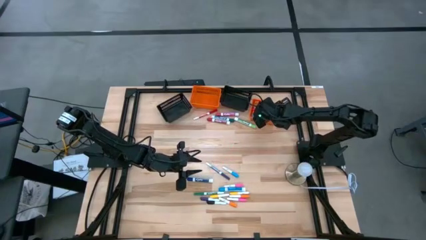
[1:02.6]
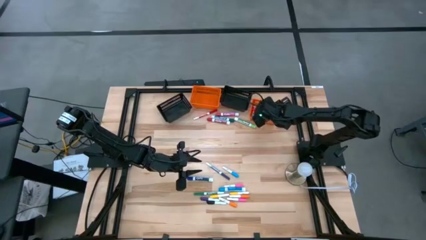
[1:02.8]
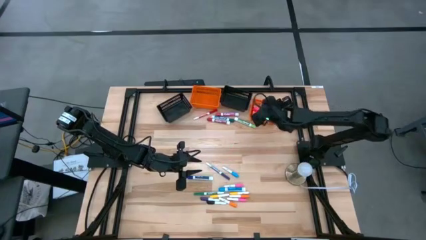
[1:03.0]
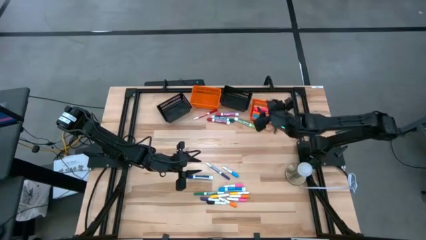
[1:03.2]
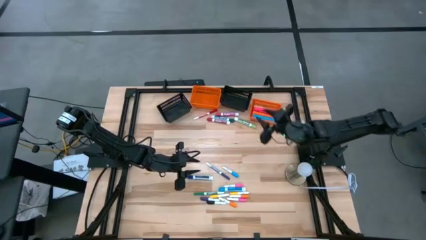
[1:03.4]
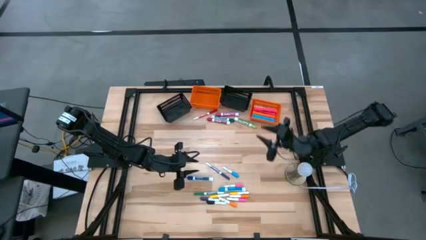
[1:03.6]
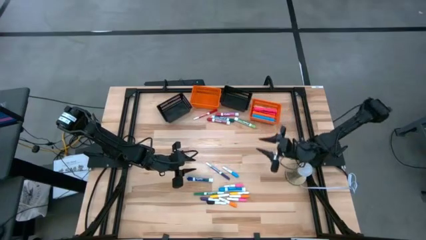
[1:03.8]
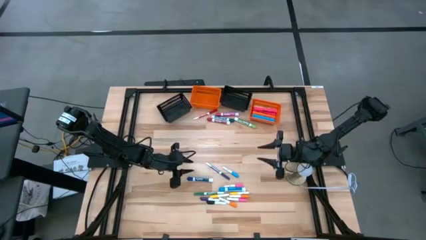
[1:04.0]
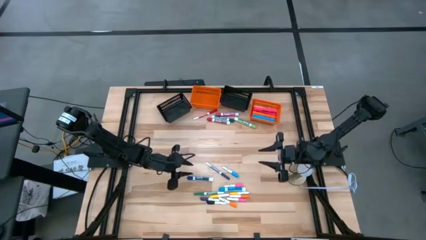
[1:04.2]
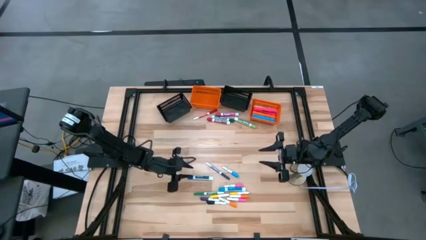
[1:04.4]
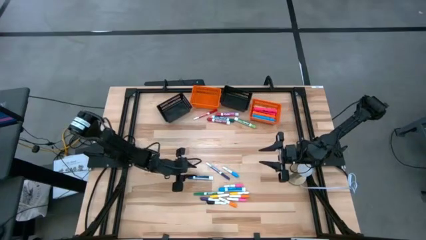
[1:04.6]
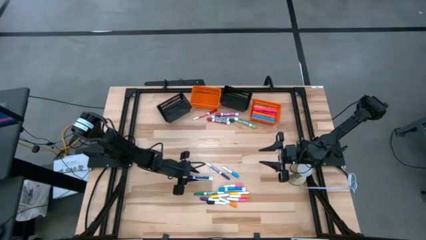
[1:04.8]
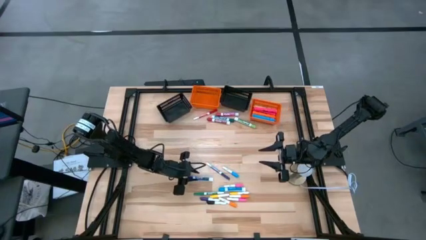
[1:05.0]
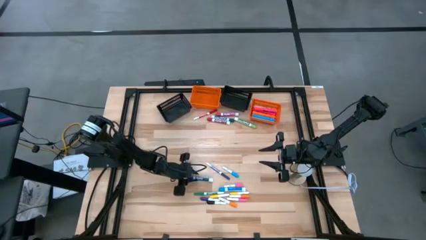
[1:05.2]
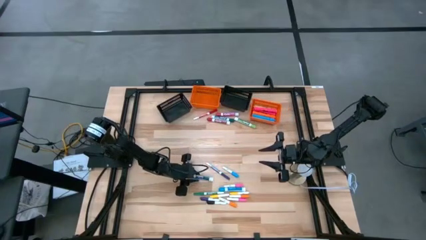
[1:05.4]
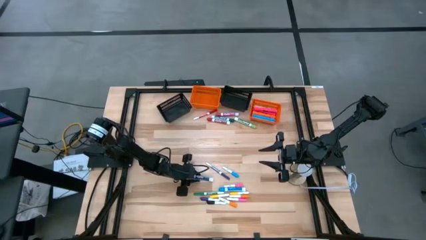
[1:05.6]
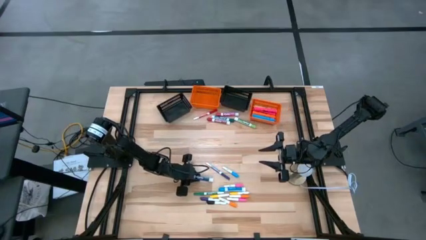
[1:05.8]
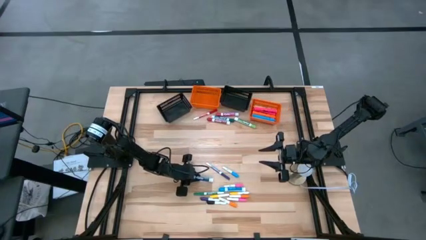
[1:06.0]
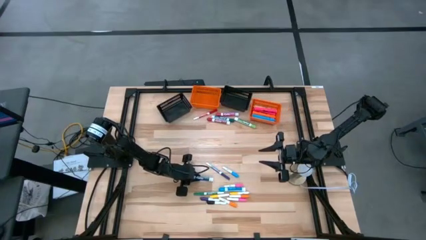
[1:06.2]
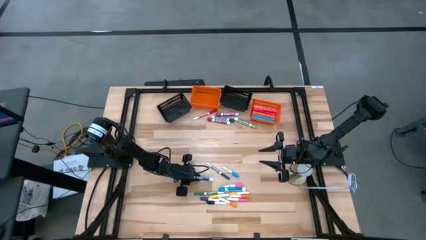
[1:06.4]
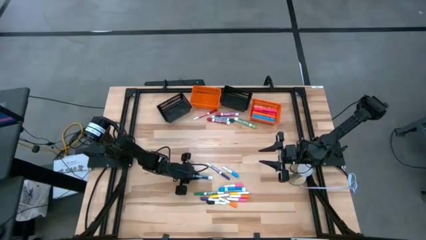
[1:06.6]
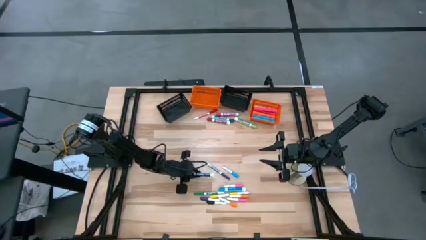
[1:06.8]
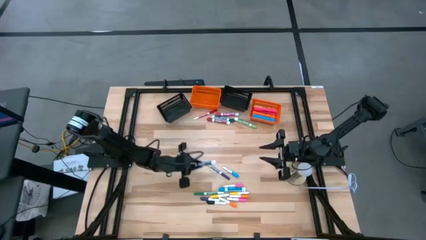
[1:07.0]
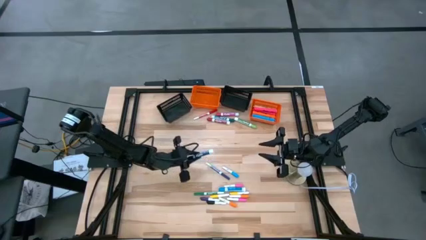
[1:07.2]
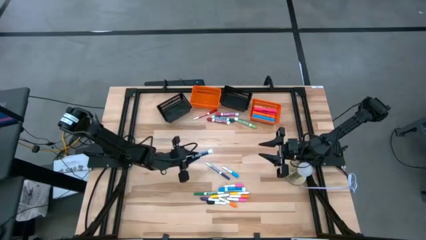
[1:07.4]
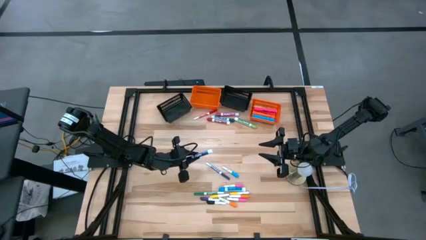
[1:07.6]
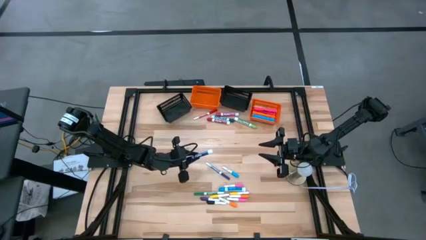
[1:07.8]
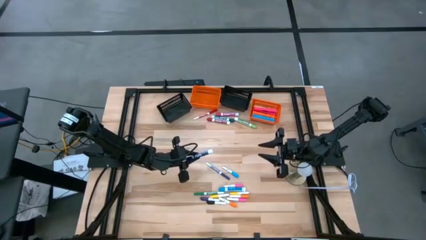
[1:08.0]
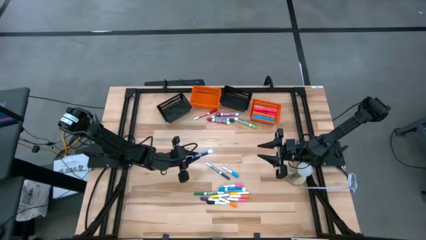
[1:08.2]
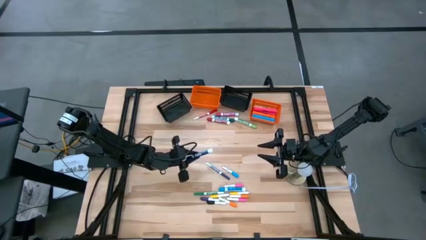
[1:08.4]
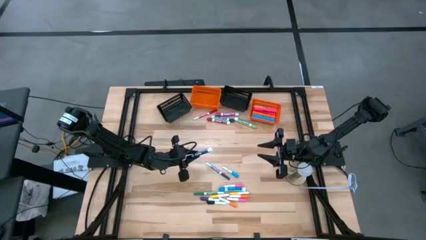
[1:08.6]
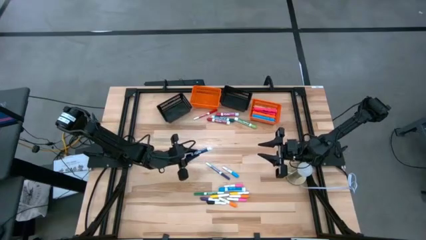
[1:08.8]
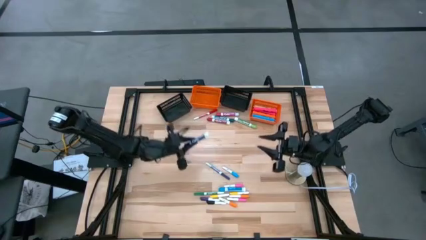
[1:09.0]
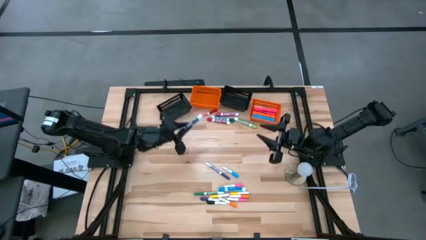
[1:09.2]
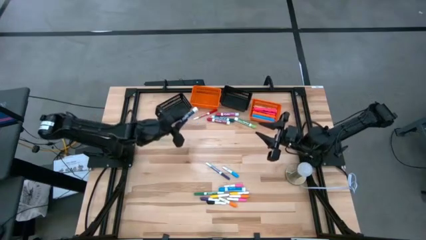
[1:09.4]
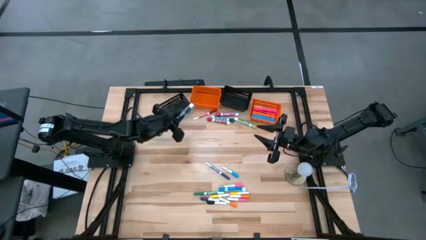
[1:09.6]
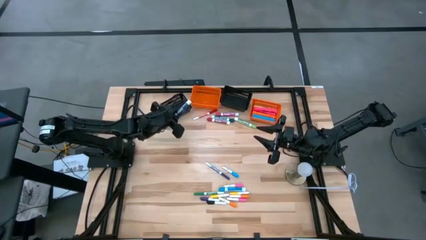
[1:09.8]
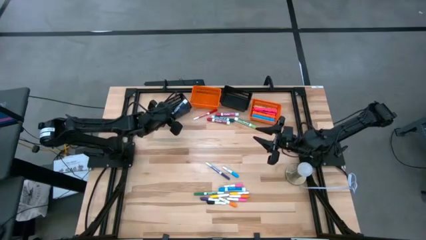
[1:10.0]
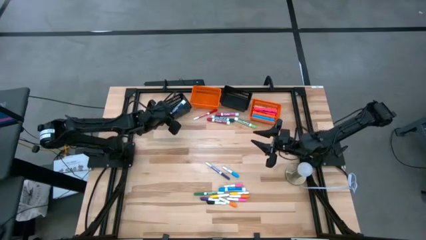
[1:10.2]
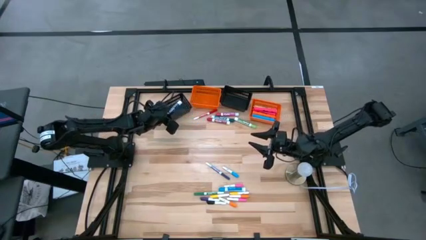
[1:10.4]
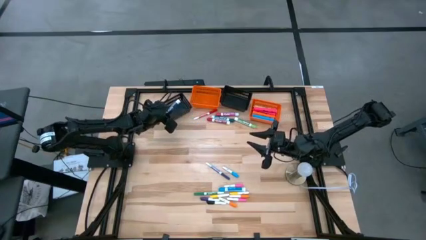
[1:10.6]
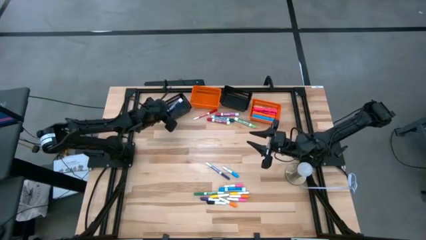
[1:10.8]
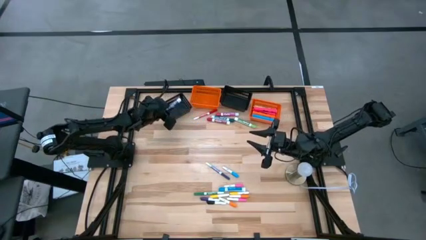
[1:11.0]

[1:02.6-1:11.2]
Task: Pick & Place Markers
Put the large blue marker into the left black bin

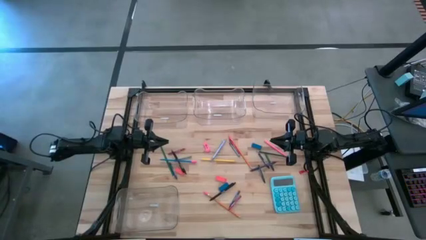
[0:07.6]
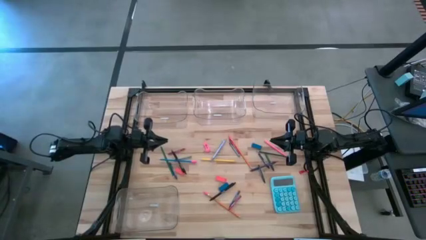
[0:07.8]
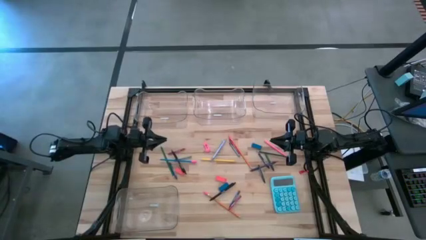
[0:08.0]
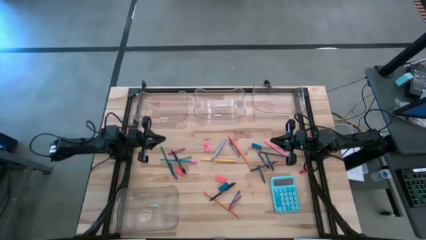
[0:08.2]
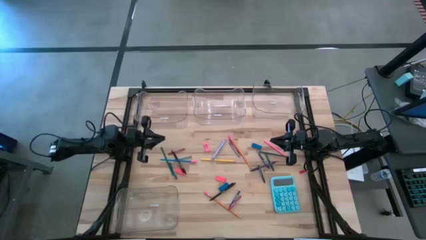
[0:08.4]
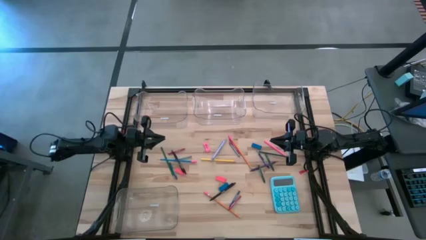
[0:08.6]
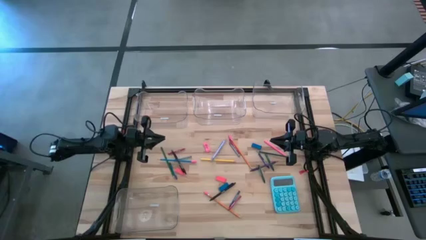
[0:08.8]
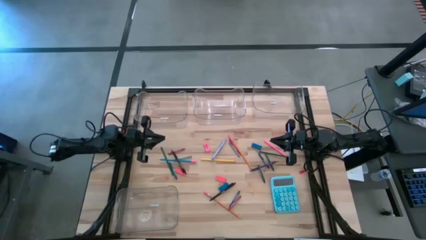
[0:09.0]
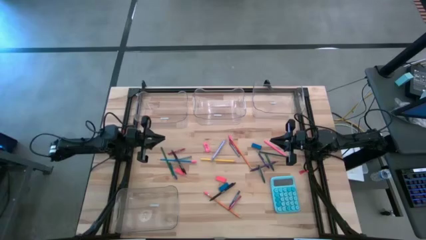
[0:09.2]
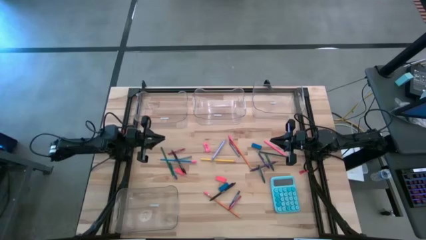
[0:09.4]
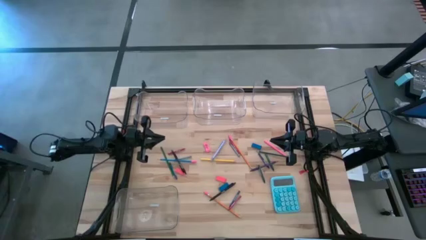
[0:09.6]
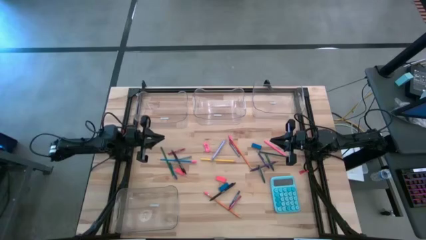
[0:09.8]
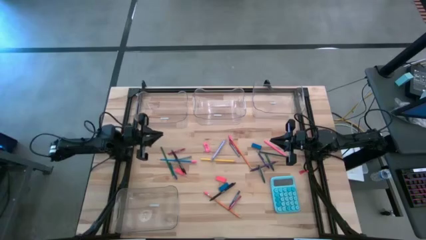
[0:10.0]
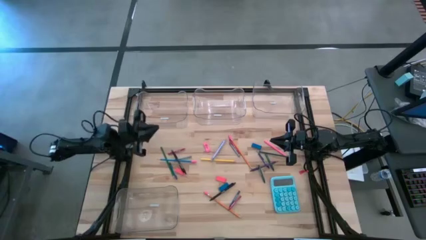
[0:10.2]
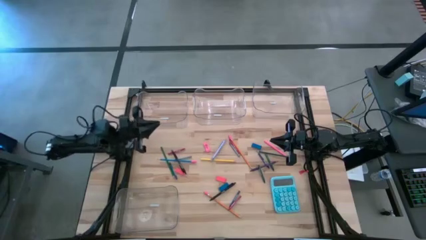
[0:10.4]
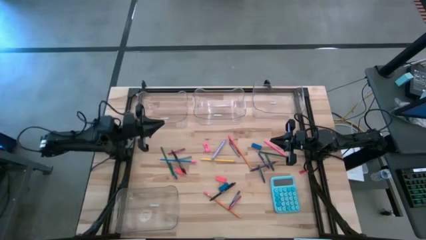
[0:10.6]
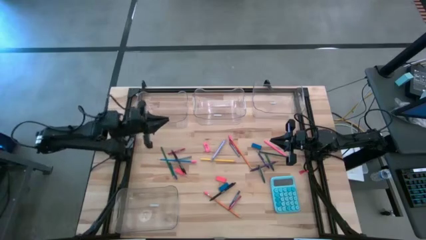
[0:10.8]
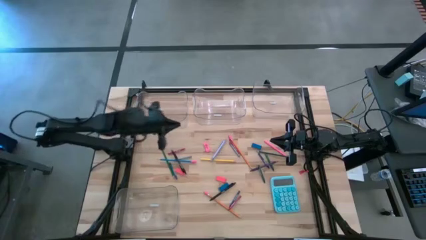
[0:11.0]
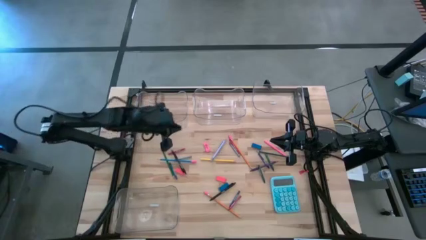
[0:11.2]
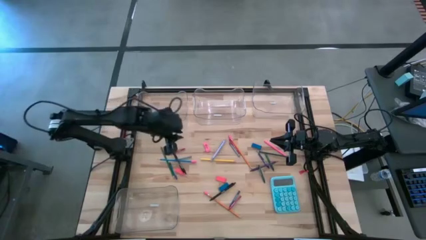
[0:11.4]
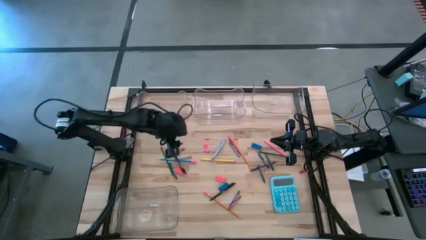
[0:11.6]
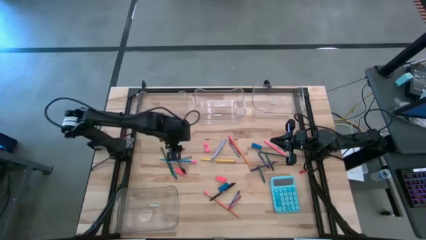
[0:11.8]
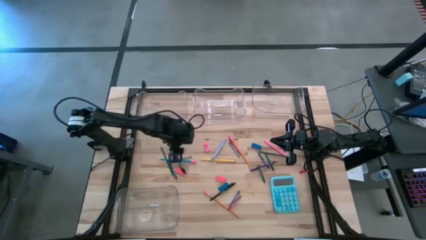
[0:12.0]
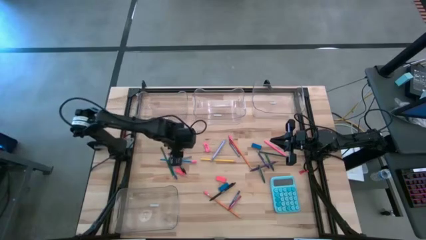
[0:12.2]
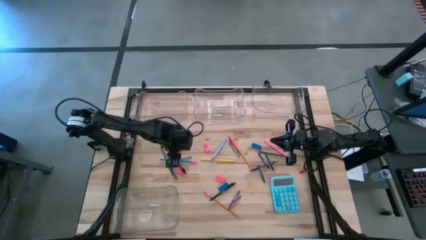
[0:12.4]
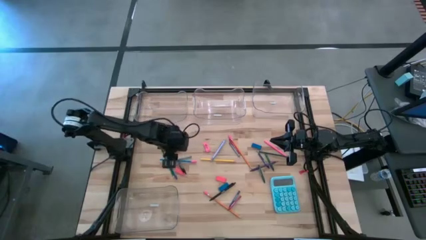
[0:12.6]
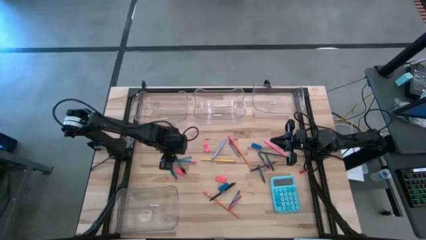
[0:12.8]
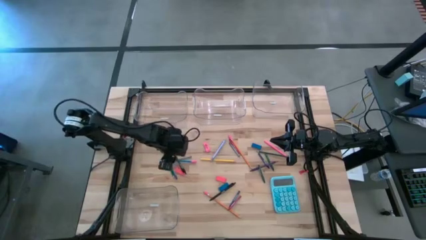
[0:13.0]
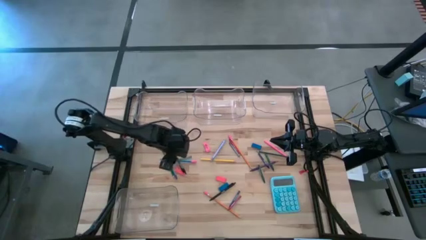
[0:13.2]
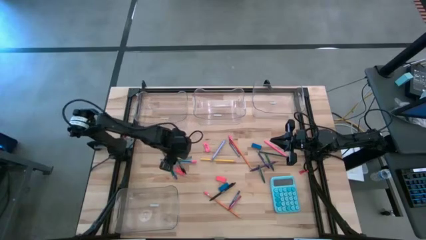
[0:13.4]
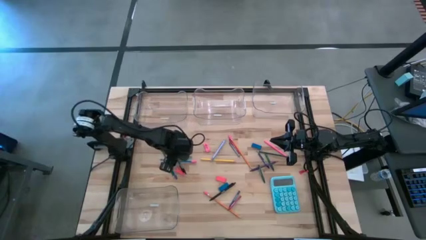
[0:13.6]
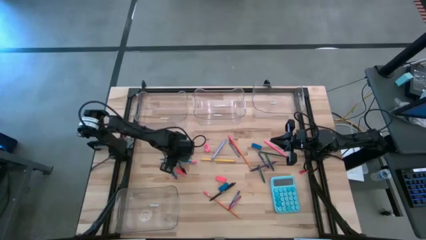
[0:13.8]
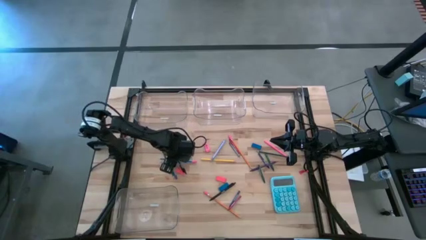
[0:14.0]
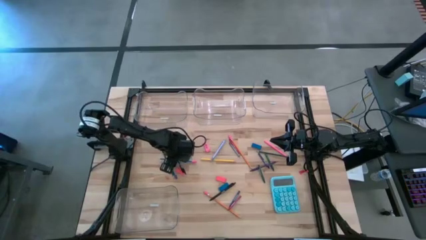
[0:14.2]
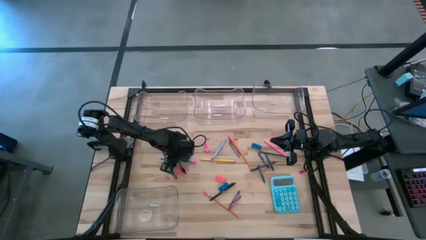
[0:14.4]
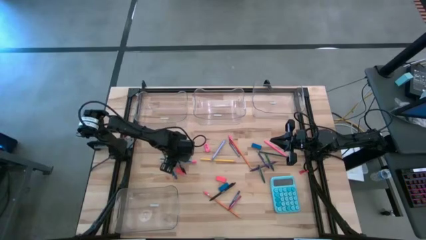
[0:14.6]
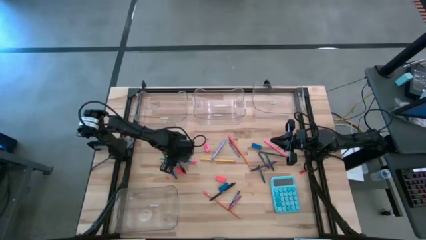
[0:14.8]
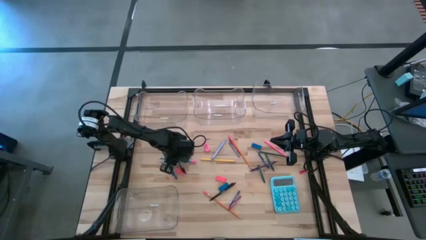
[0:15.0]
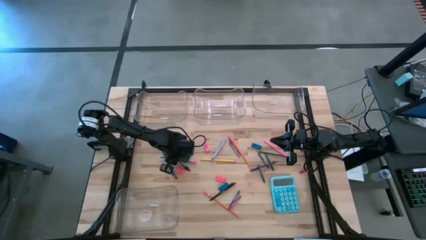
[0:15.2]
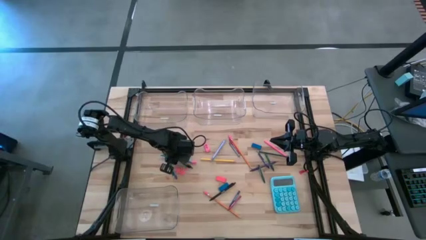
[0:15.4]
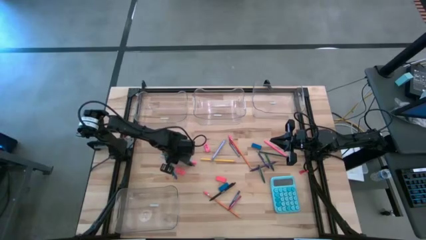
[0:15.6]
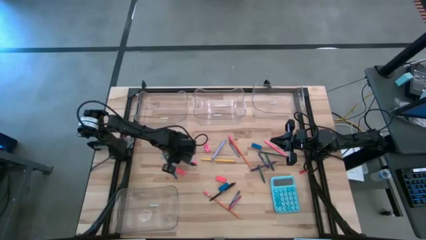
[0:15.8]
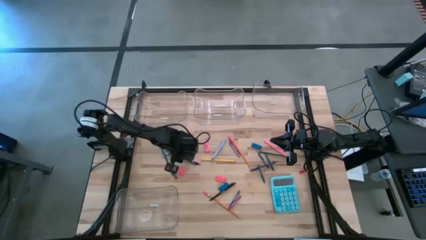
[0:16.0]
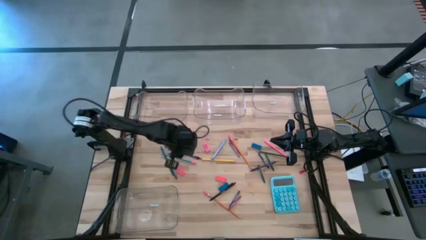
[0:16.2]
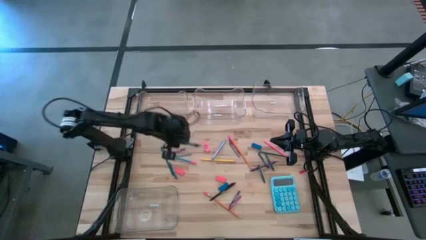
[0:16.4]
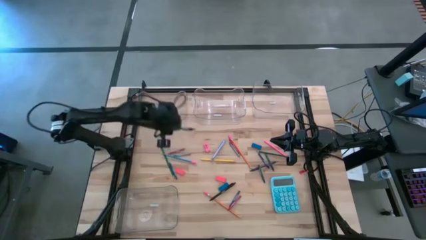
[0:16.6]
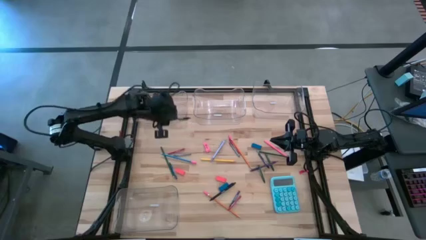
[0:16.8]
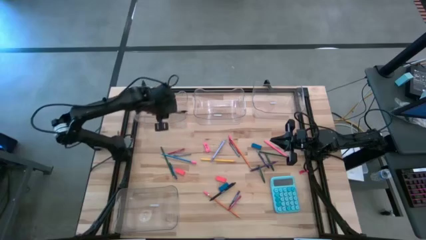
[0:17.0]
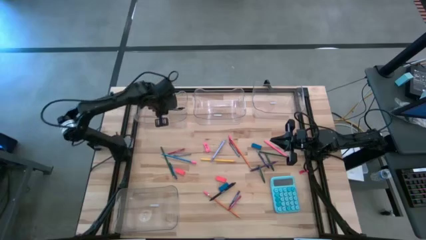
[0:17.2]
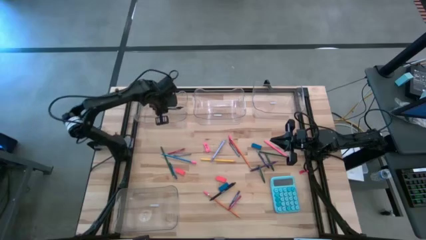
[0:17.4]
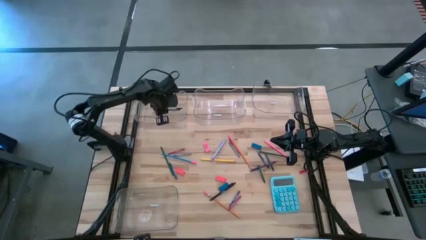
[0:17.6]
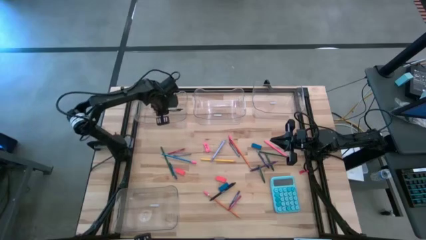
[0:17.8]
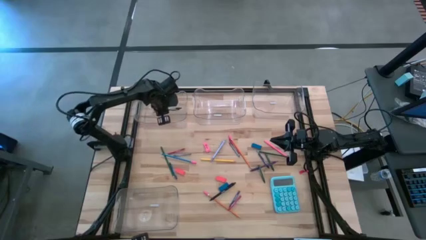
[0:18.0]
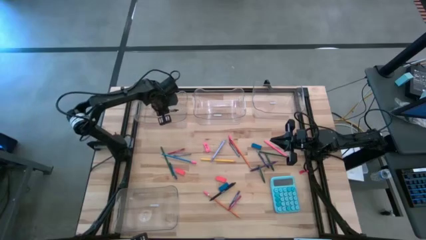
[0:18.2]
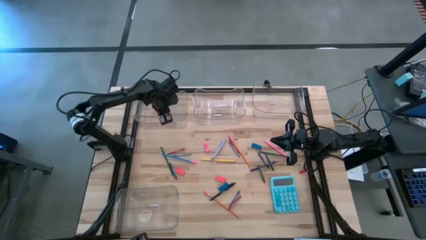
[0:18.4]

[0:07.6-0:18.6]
Task: Sort crayons/erasers/pens/pencils in bins
Put the transparent black ballpen into the top left transparent bin
